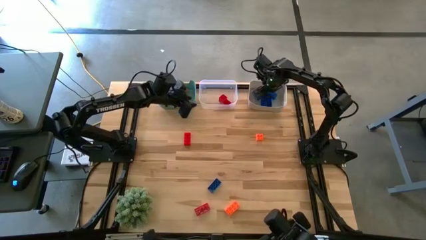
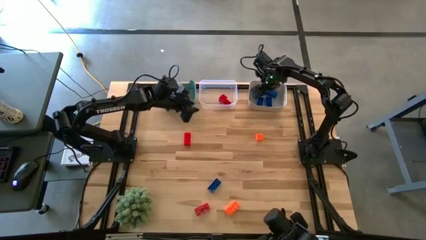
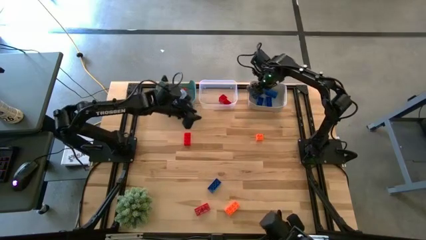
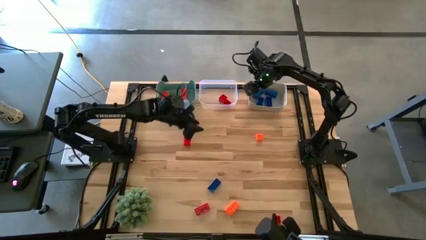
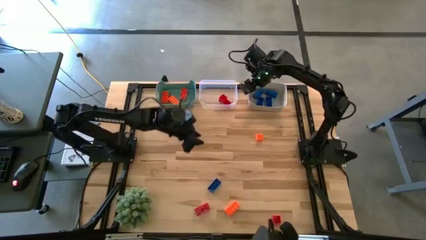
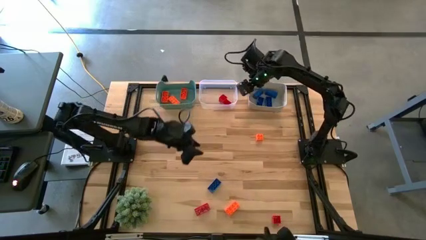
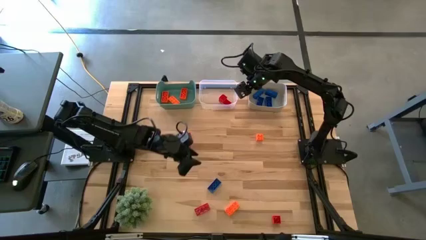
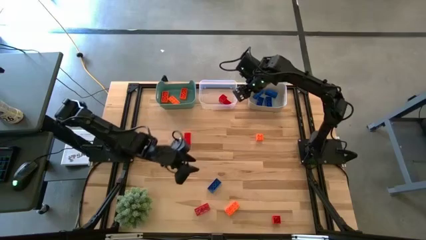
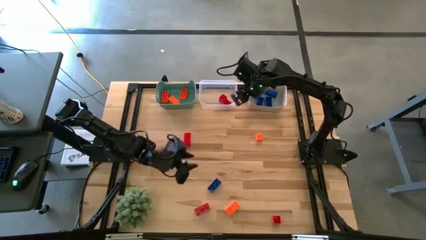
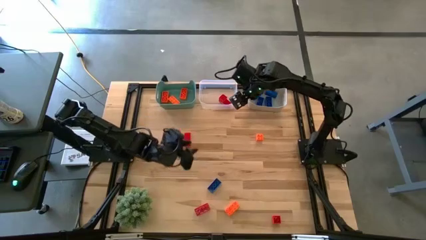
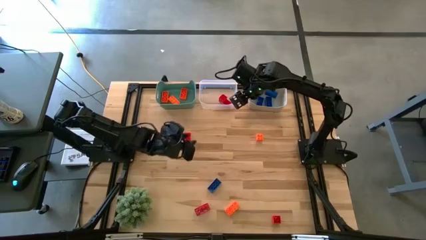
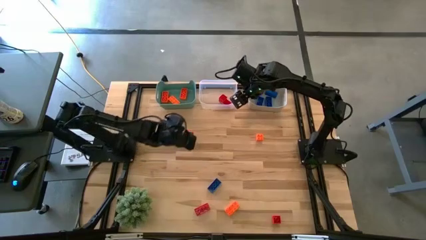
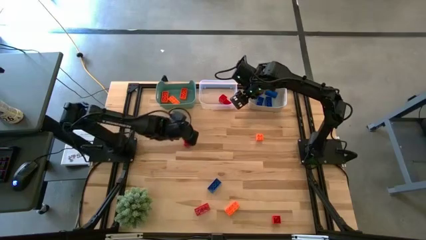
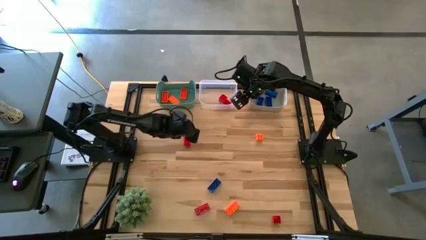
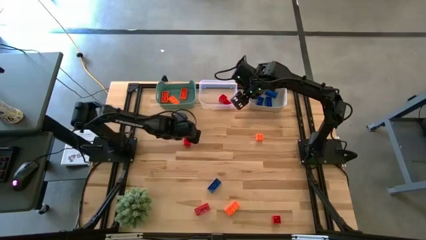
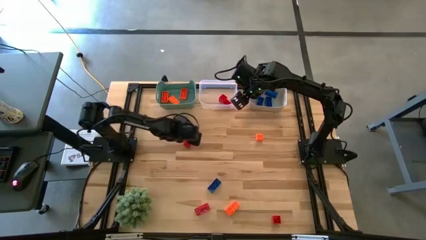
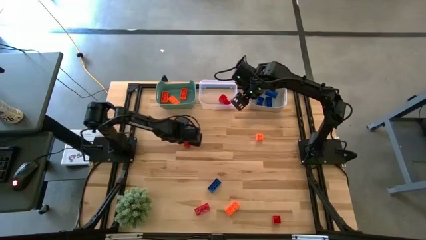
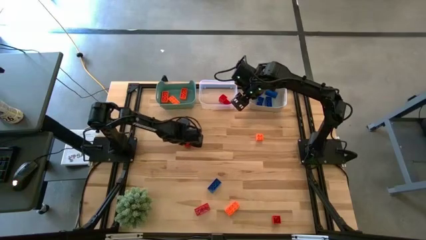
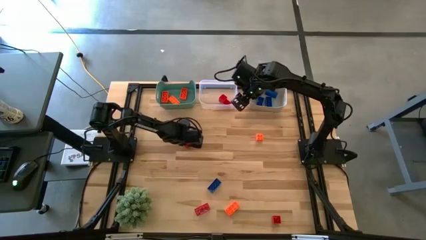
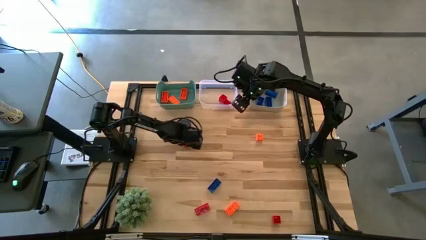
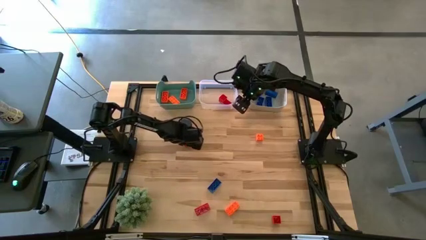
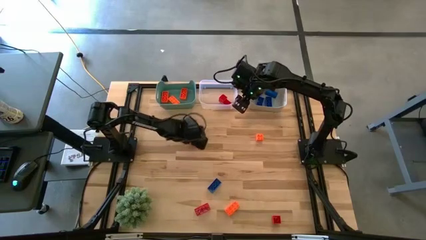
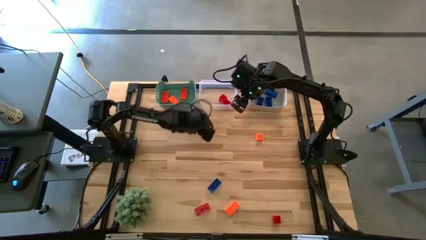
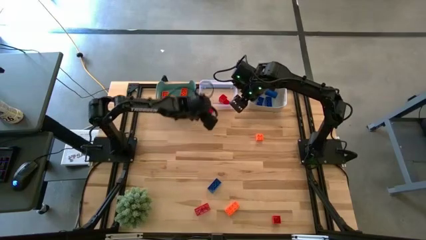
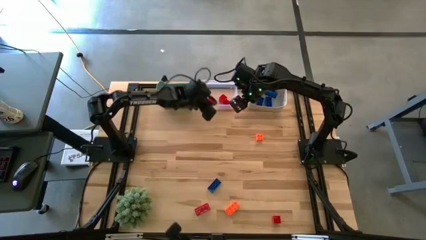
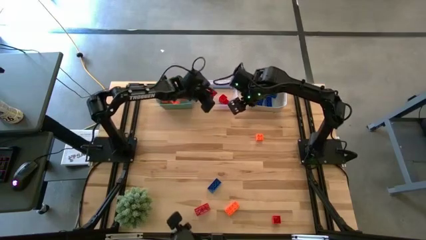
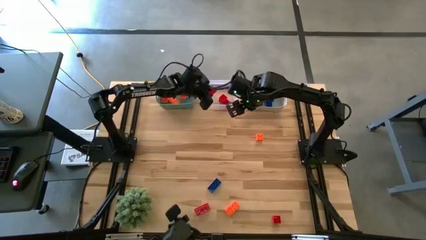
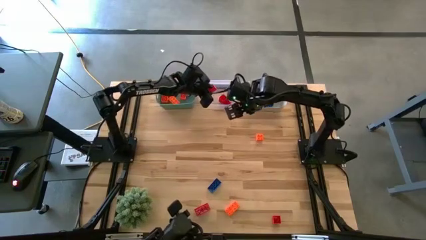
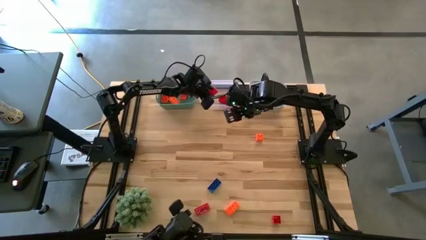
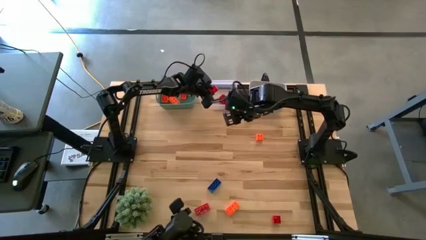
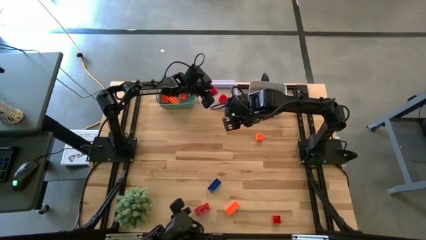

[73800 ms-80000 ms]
Task: Sort & place blocks by color
Put the red game piece into the transparent bin

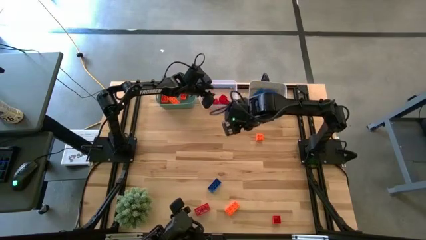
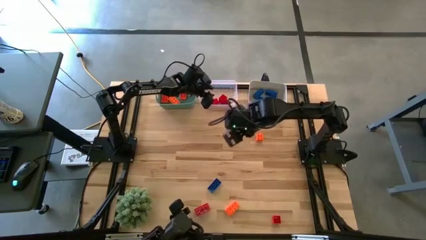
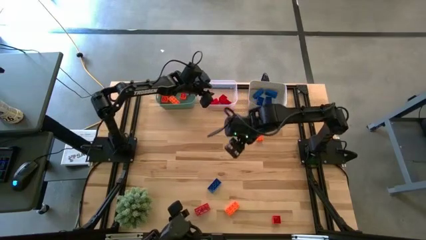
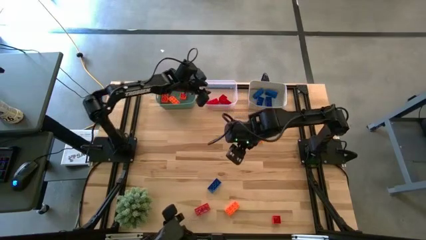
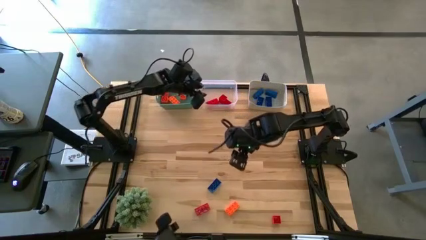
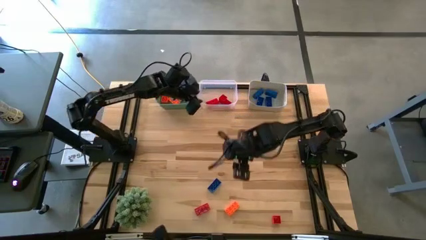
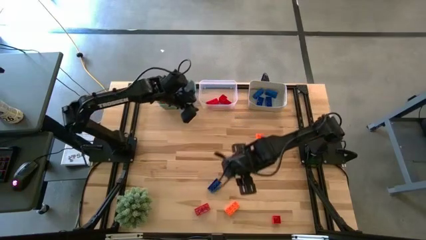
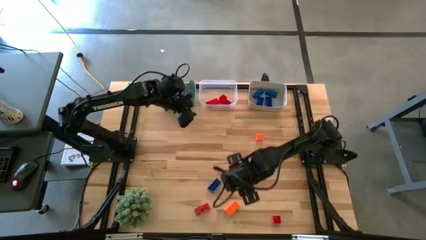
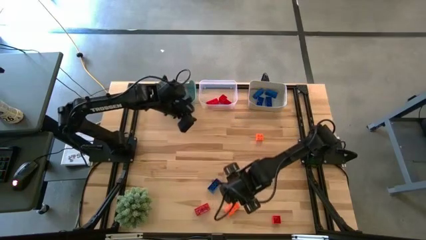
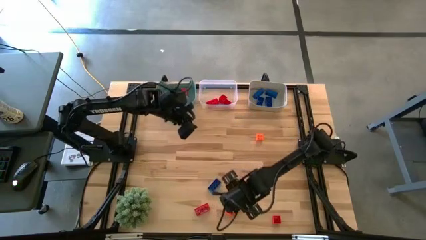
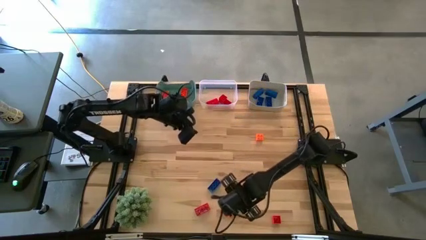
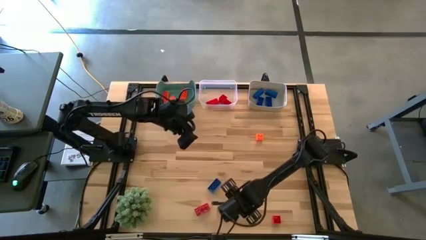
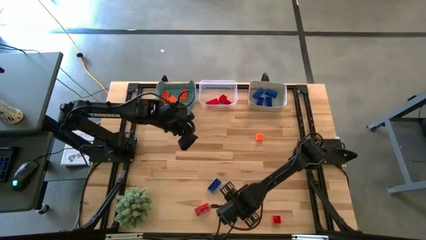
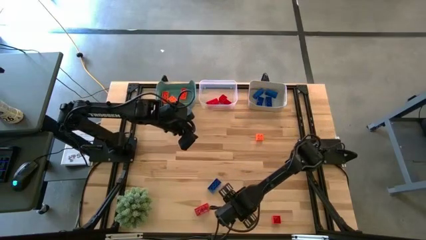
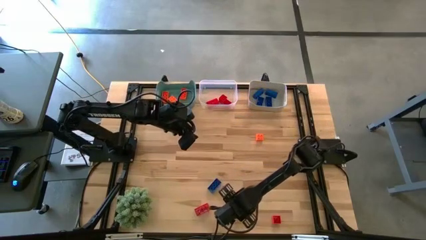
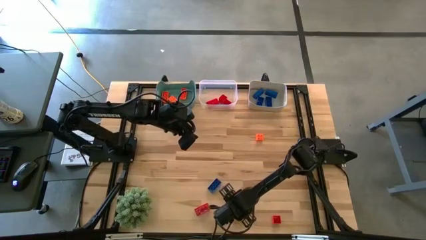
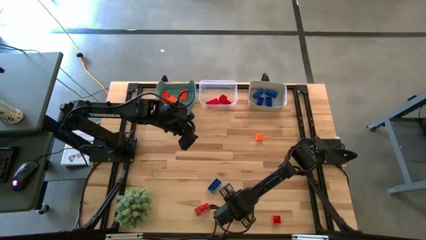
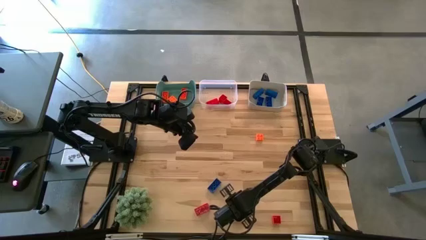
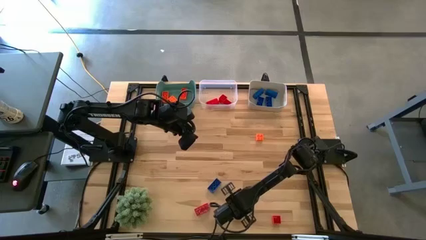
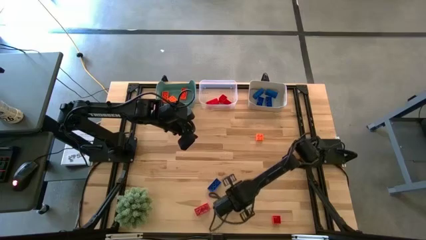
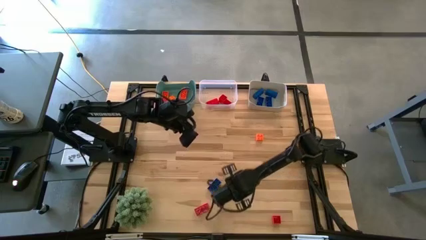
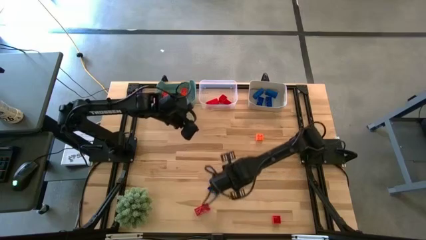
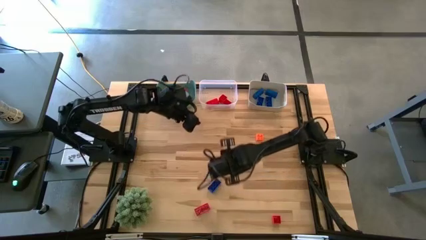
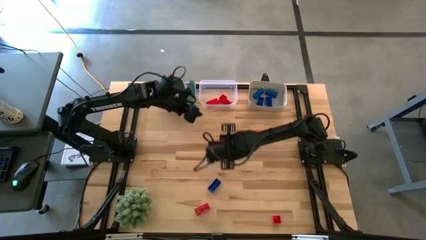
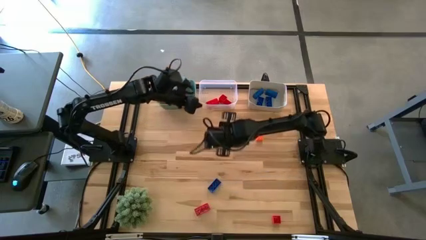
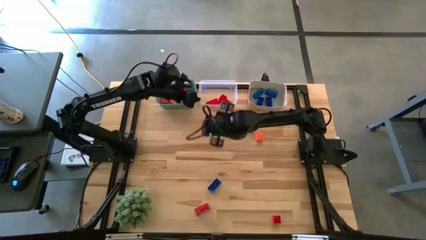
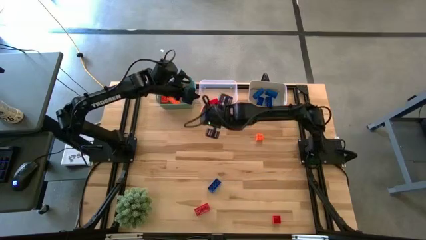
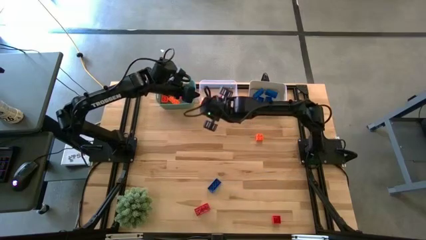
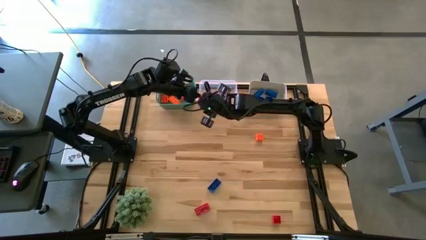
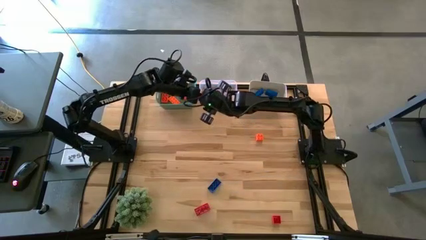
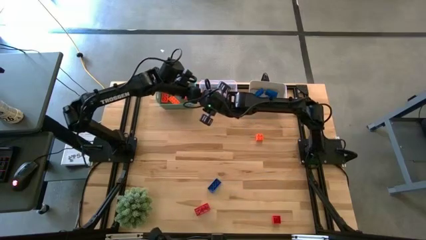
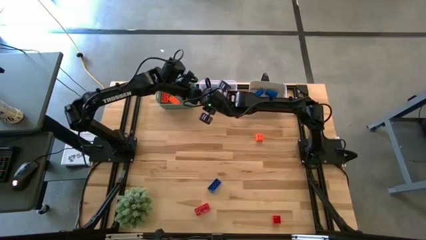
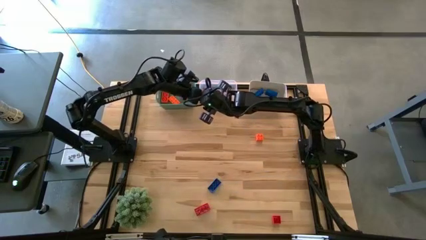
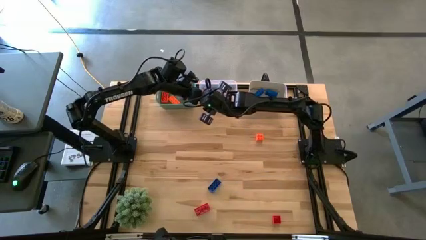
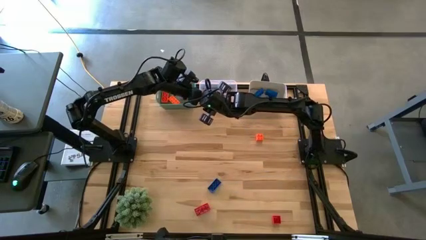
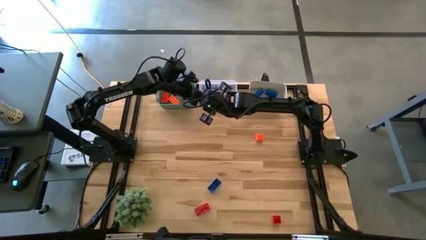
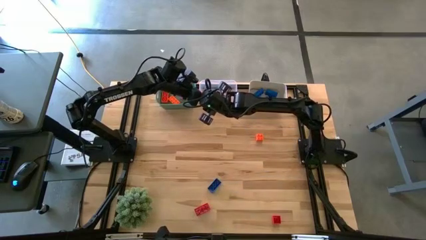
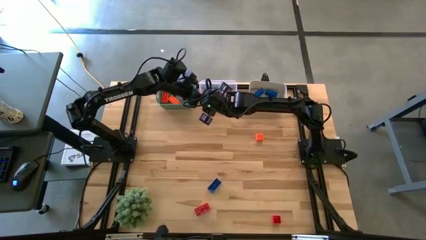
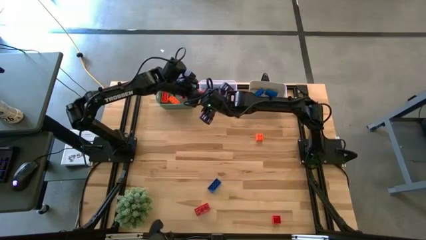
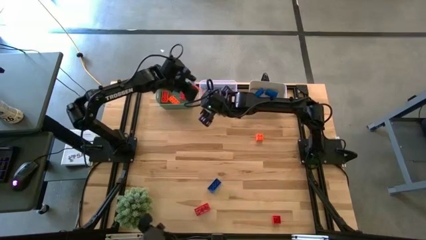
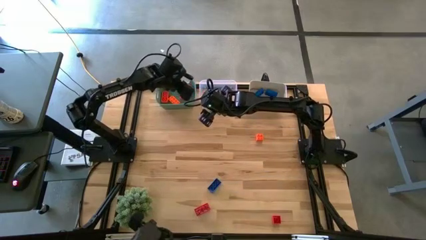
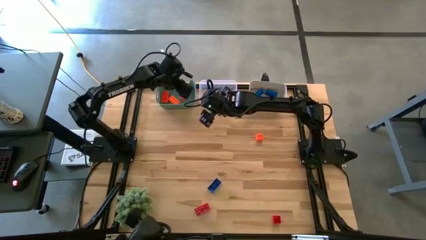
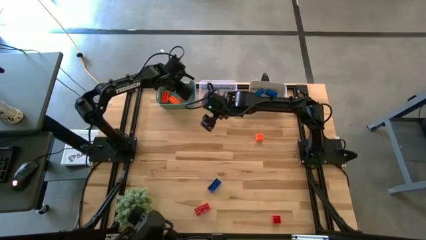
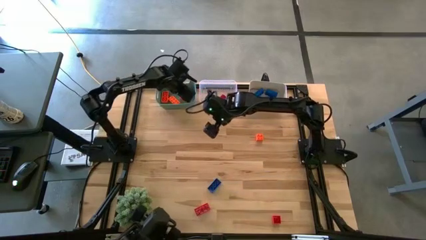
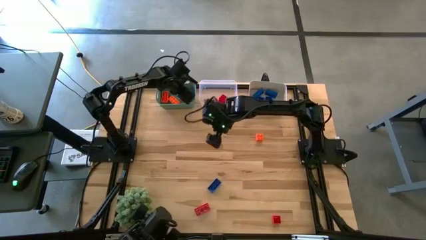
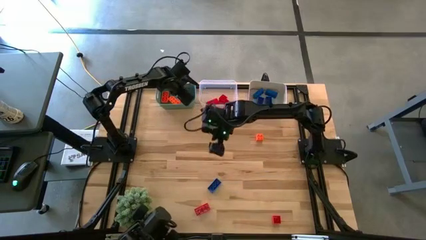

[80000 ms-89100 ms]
Put the orange game piece into the green bin
